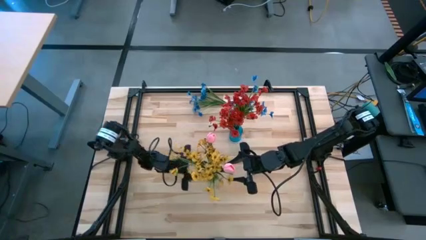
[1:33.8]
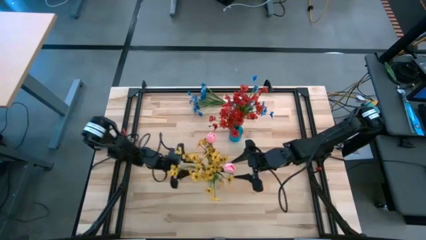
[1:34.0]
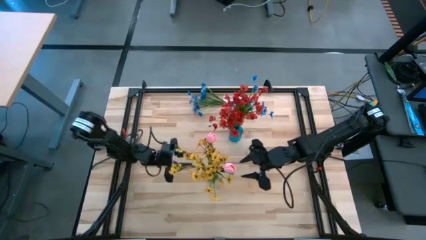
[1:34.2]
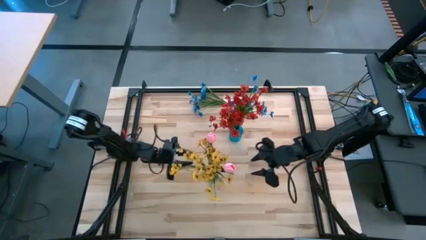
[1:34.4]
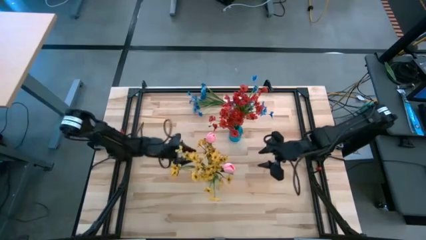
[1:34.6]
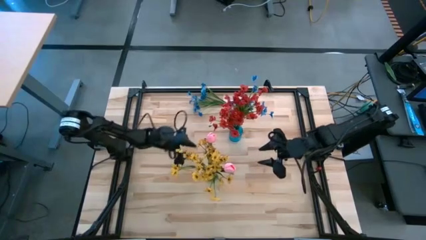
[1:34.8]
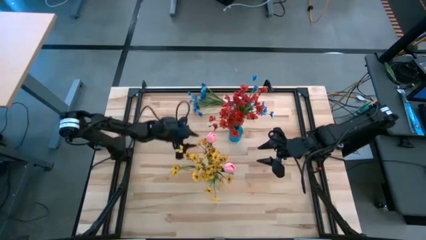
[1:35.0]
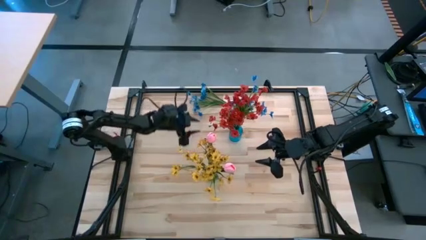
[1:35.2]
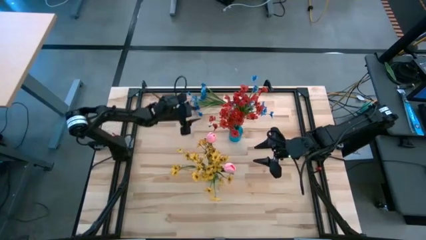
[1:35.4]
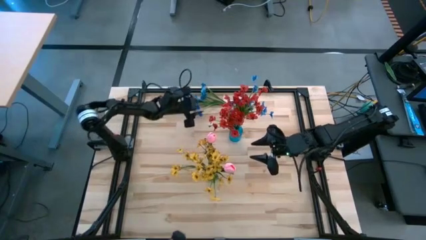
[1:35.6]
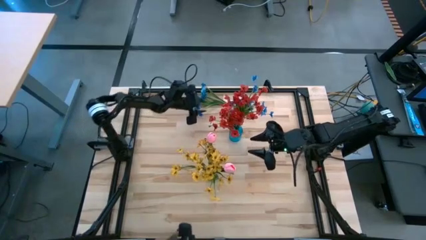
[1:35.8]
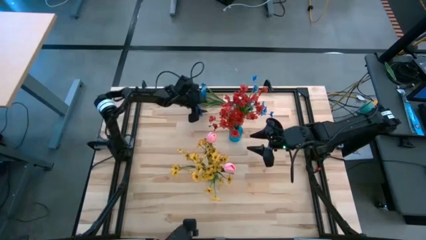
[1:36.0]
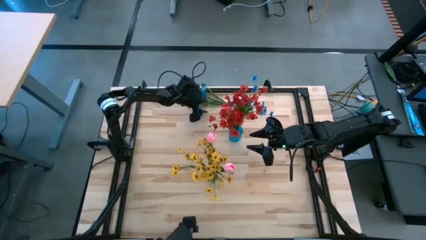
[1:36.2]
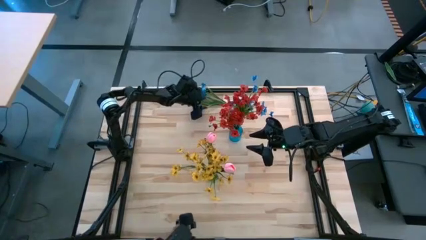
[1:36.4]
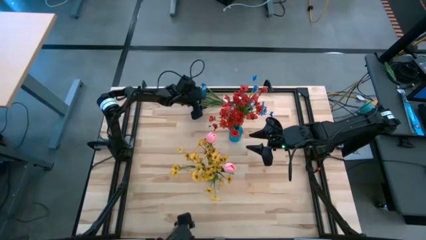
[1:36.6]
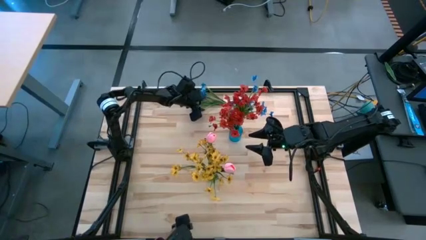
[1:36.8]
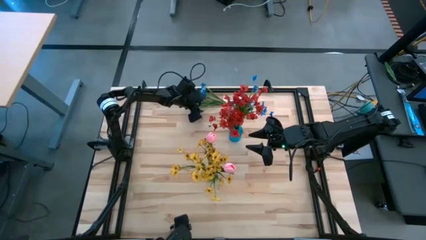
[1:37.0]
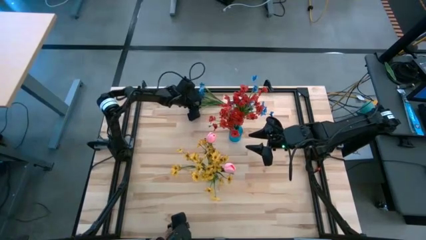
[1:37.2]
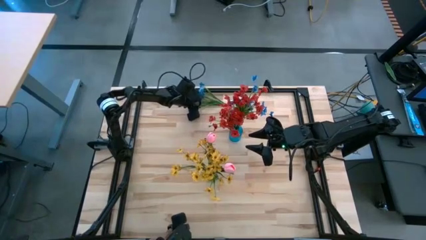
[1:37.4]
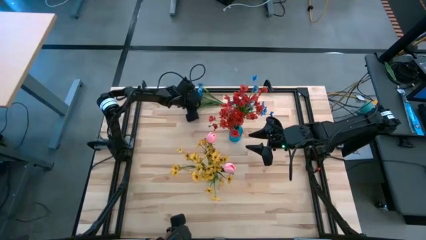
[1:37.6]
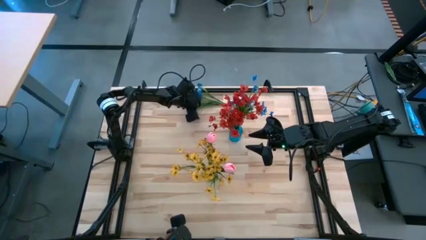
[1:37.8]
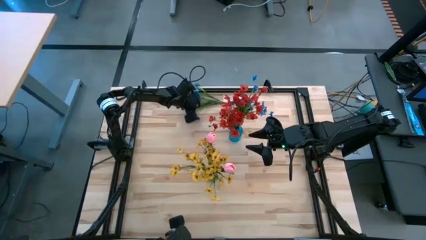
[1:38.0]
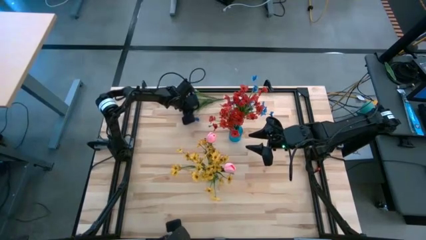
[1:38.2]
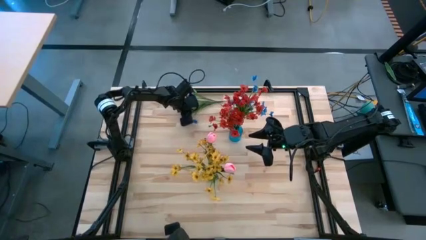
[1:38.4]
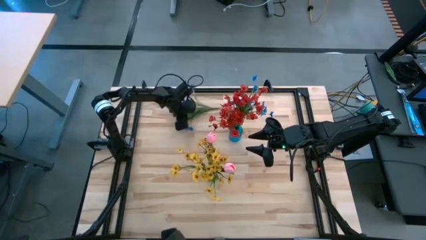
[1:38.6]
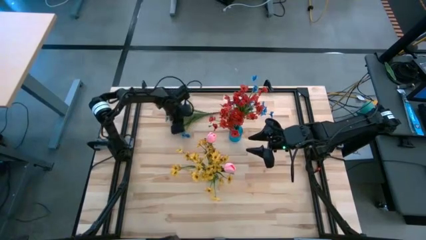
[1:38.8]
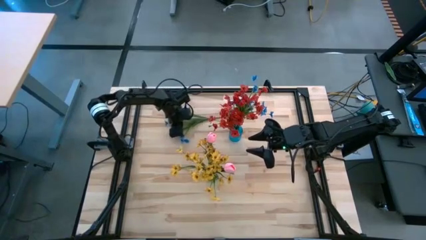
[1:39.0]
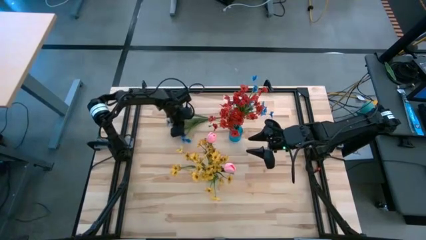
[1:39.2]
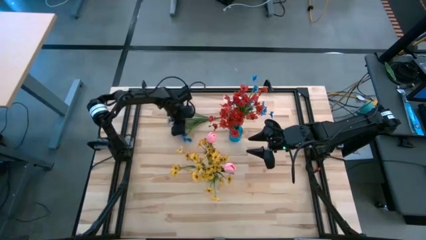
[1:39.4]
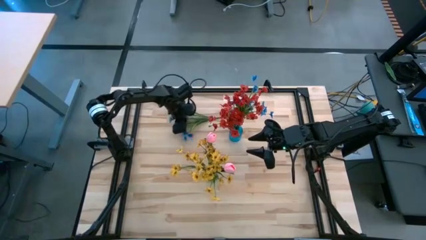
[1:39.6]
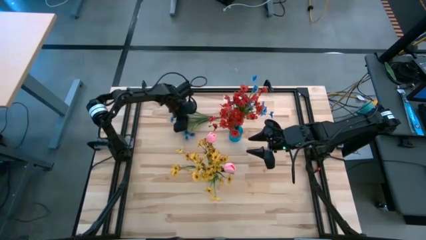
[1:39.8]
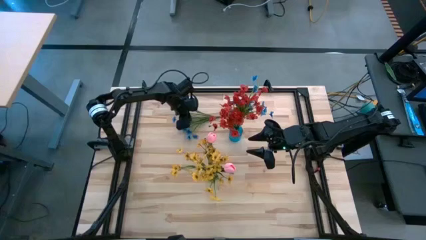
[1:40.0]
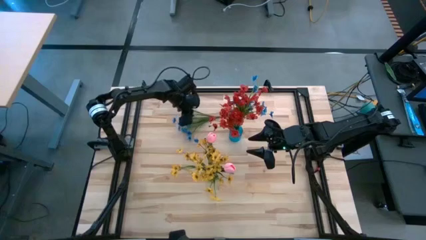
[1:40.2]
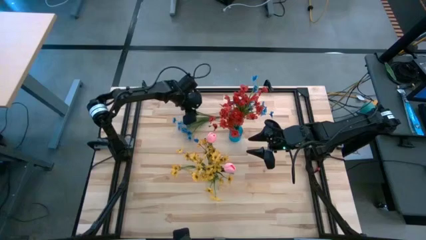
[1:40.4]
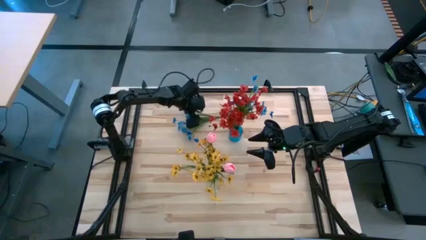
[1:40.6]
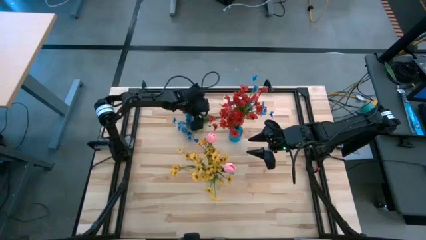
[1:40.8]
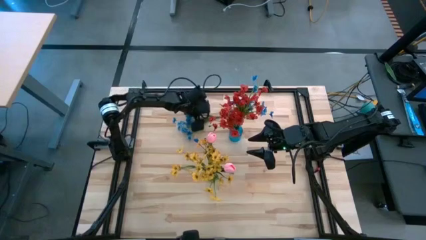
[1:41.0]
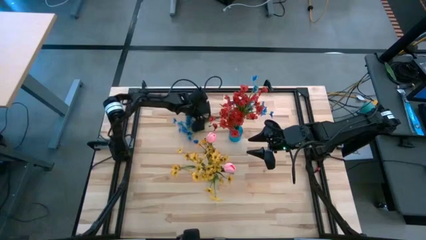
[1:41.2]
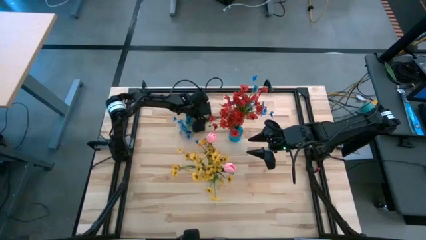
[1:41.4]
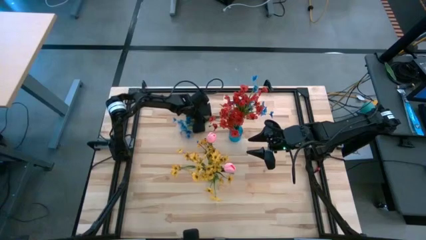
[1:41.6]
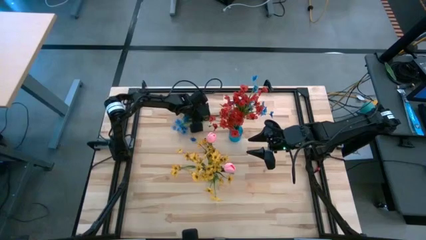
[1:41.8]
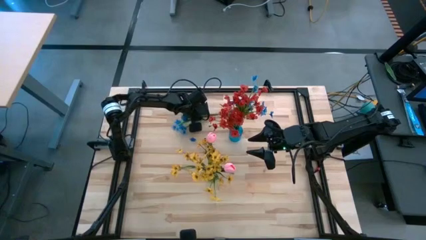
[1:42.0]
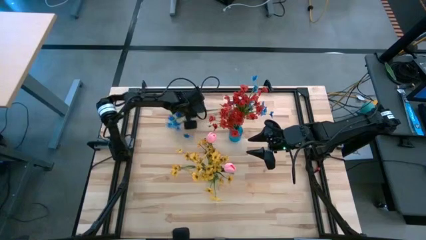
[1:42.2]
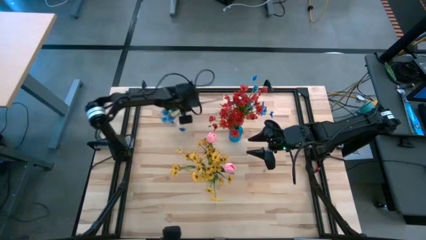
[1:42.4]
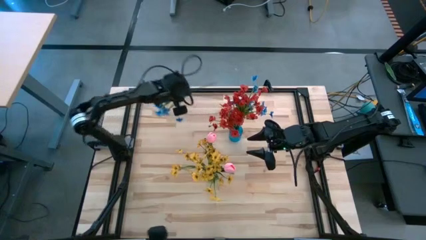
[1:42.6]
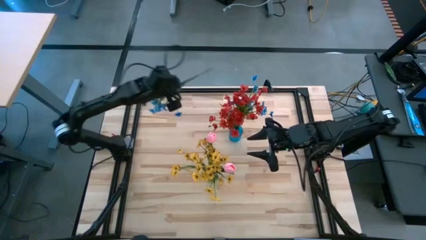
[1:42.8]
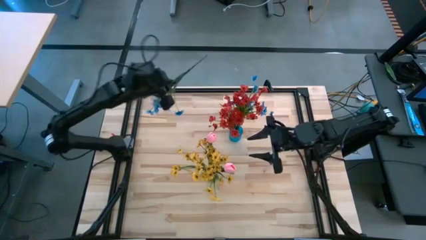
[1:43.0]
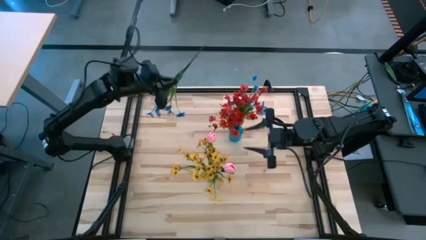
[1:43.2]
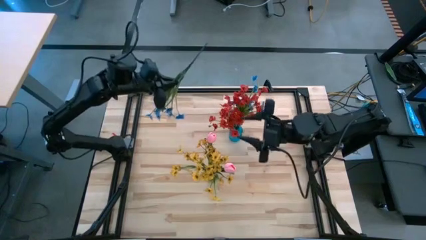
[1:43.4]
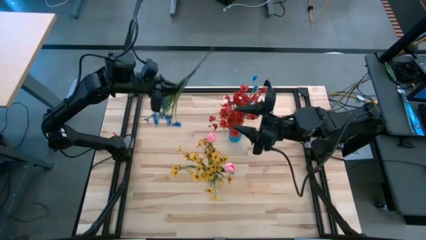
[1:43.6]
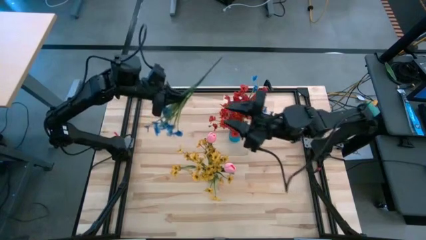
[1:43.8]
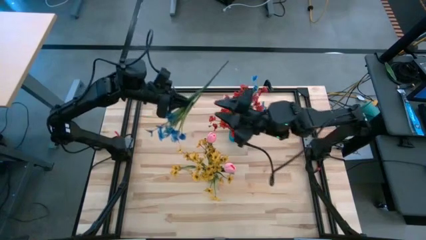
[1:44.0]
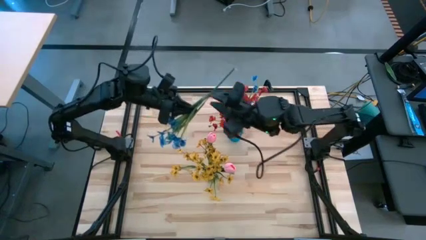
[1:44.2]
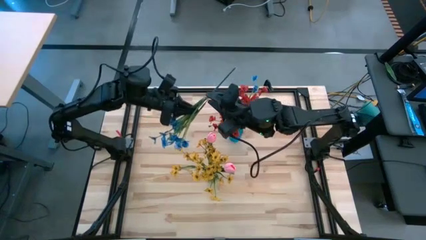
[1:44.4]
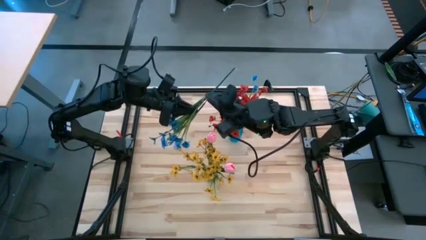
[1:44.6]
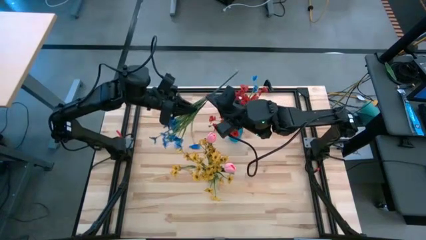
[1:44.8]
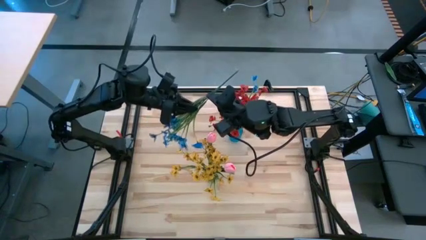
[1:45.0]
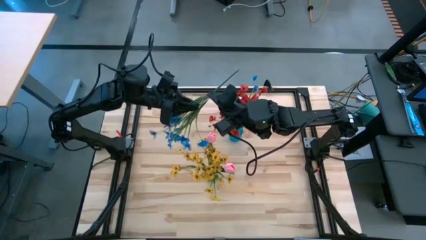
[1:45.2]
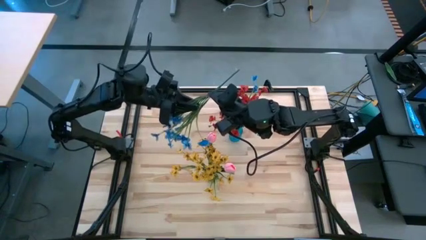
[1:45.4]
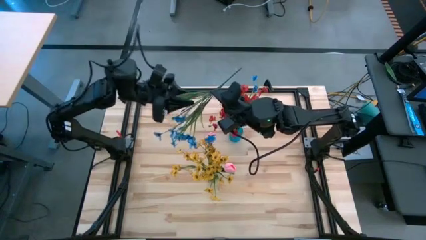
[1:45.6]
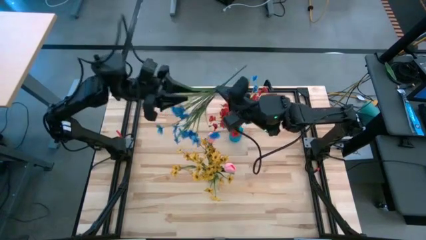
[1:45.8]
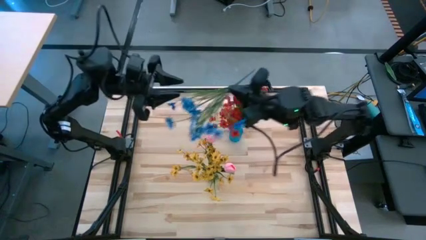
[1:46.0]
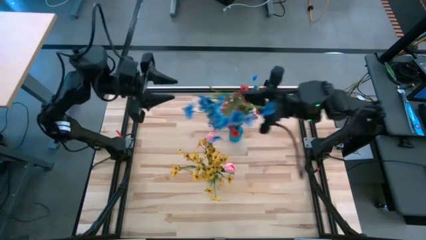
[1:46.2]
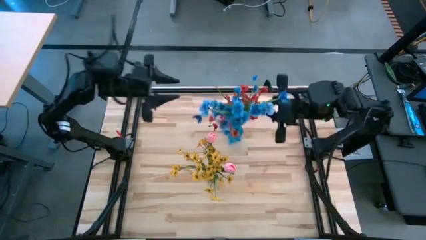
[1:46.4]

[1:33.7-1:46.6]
Task: Sort flowers into vase by color
Put the blue flowers into the blue flower vase

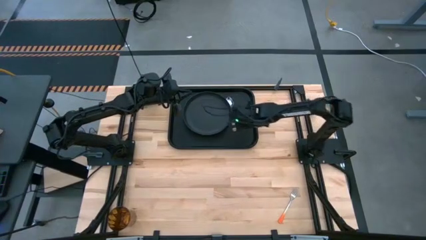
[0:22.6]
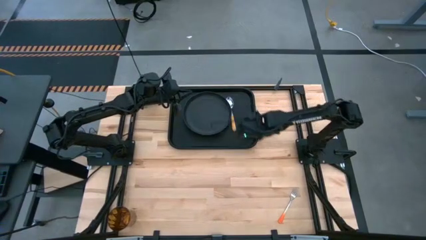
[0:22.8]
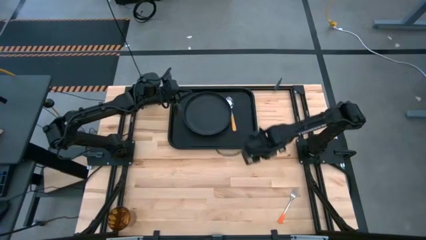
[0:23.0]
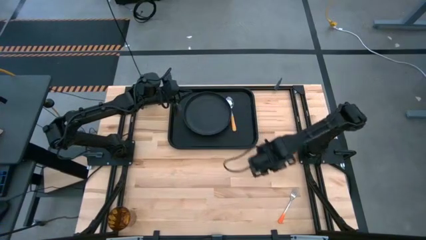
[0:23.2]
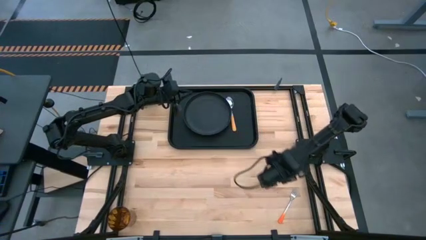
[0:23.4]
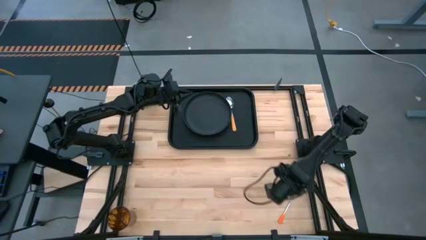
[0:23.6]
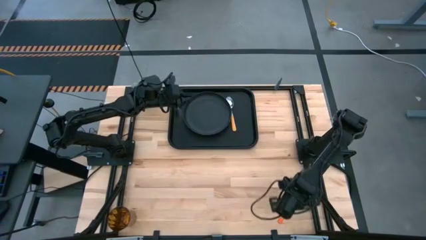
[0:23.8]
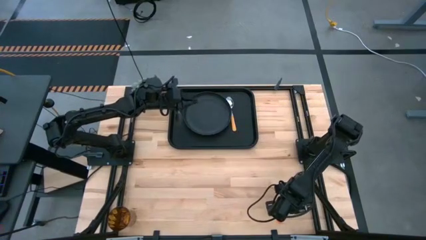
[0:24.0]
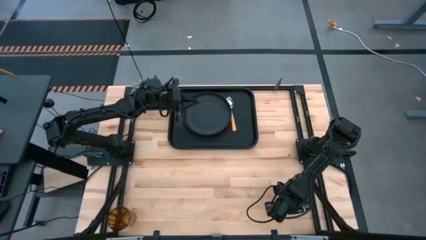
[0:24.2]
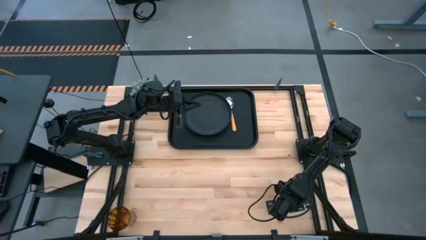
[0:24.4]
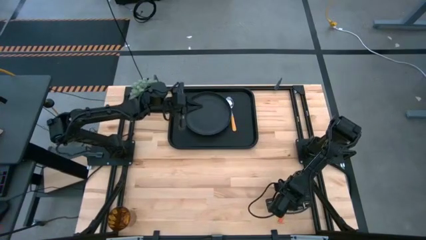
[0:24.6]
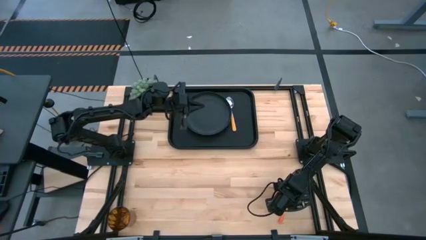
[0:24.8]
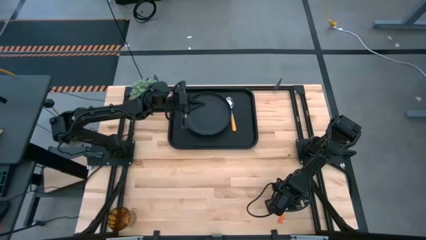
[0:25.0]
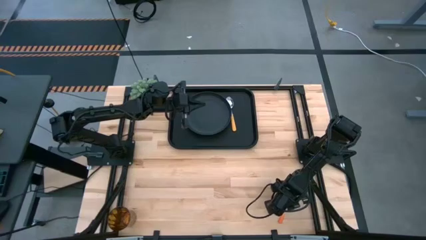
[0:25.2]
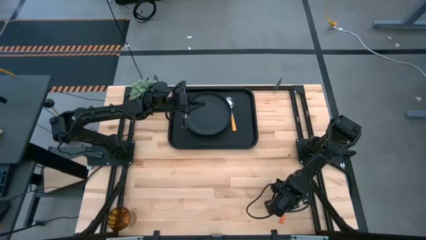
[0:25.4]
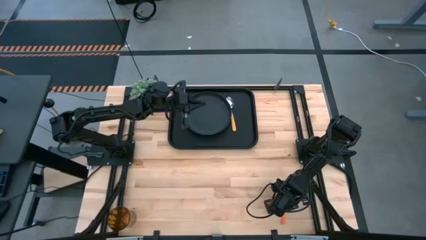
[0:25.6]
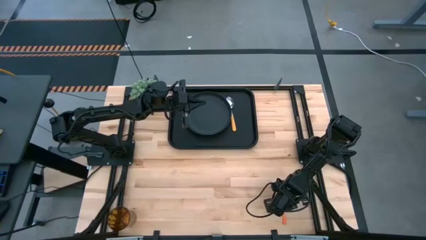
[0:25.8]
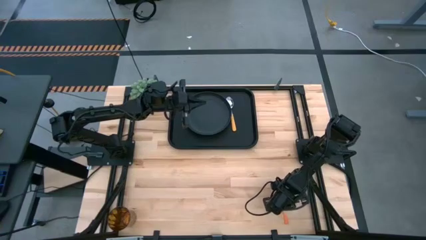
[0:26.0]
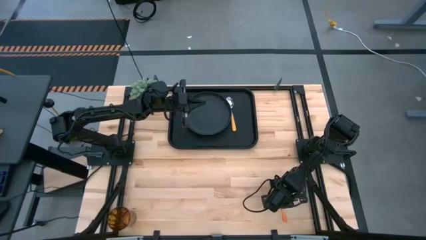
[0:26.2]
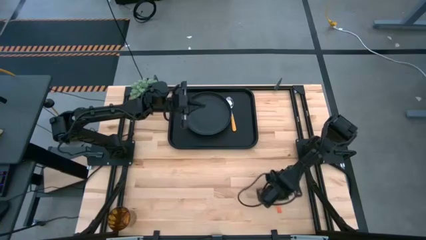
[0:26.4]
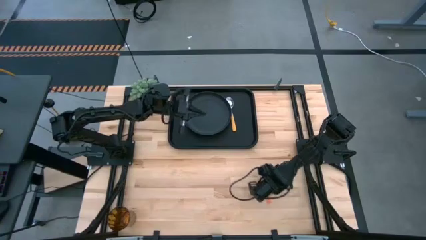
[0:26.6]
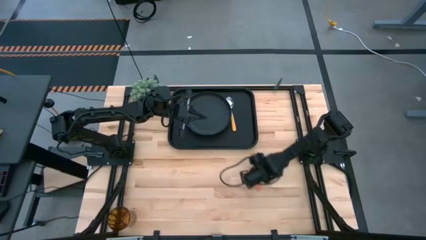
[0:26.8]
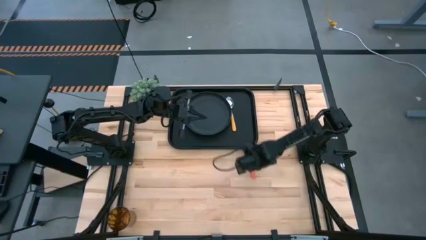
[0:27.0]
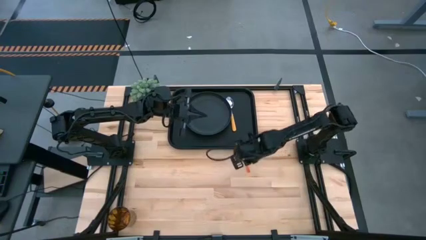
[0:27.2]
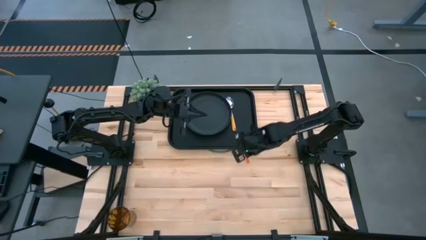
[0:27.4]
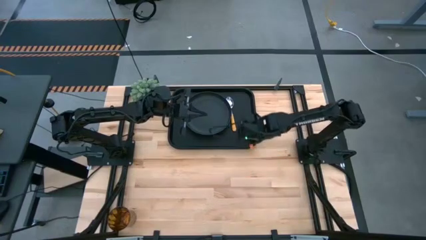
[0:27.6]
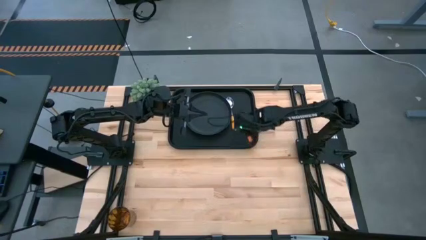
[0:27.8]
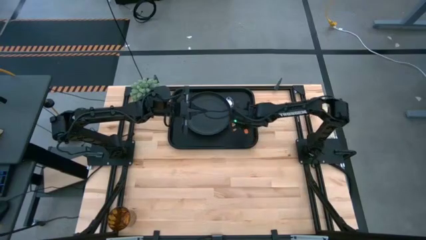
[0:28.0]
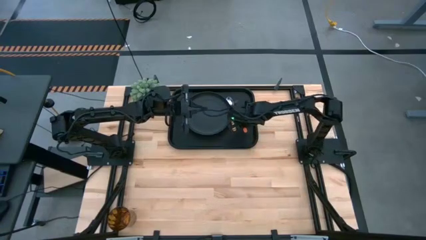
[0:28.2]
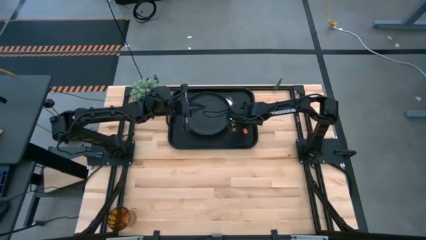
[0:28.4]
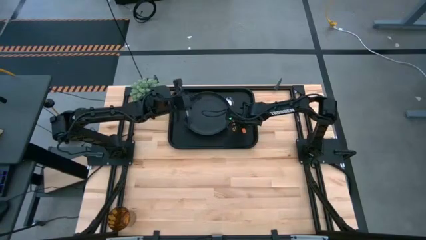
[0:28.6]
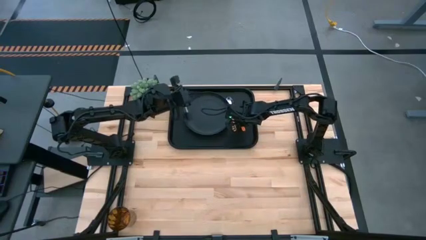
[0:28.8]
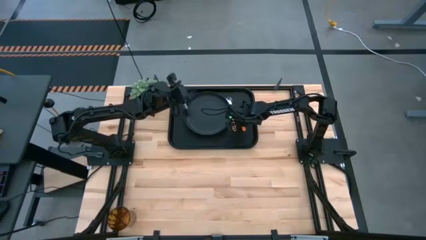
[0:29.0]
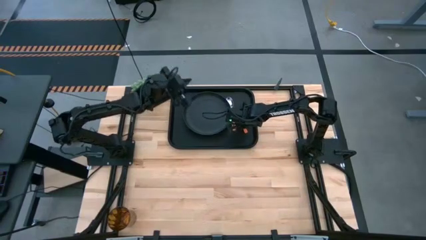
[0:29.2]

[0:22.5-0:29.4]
Task: Pick and place plate/cup/fork/spoon on tray
Put the orange fork beside the orange spoon on the black serving tray
